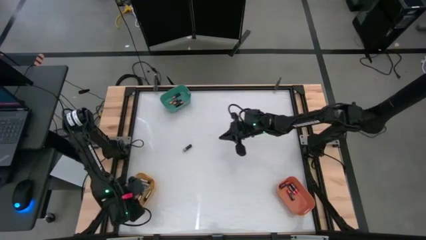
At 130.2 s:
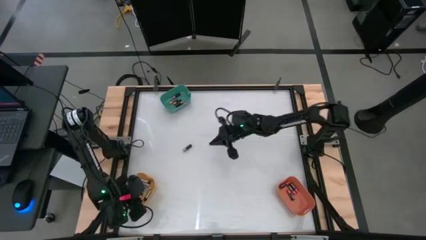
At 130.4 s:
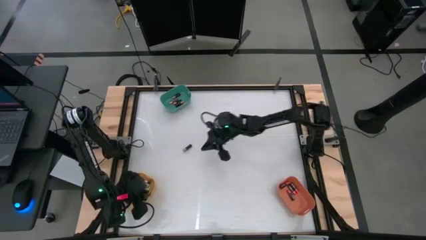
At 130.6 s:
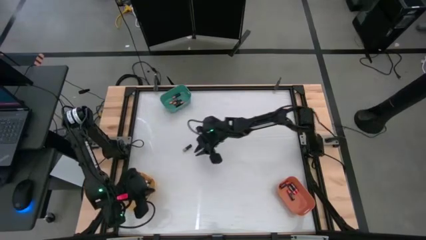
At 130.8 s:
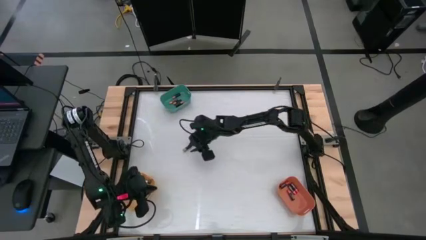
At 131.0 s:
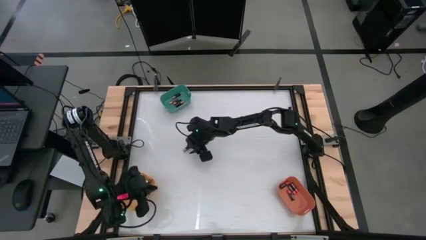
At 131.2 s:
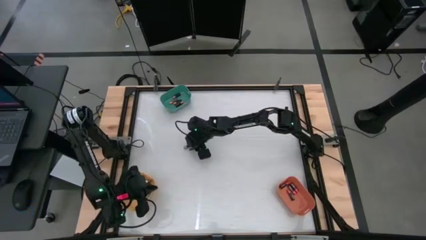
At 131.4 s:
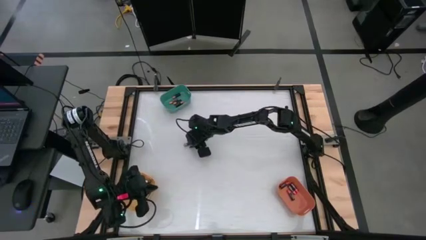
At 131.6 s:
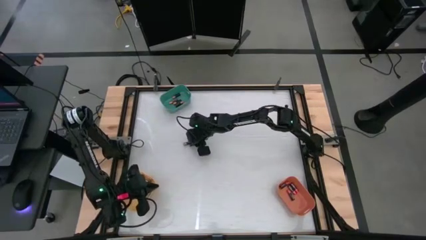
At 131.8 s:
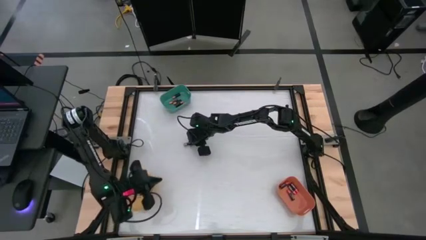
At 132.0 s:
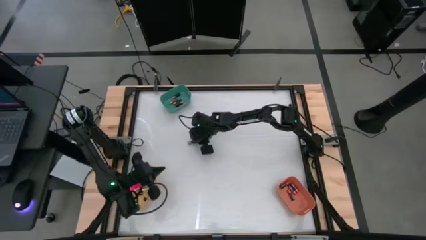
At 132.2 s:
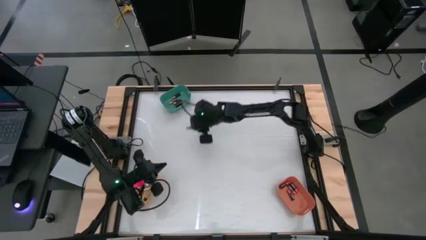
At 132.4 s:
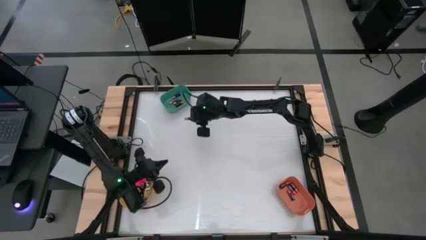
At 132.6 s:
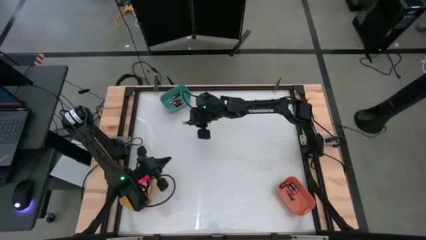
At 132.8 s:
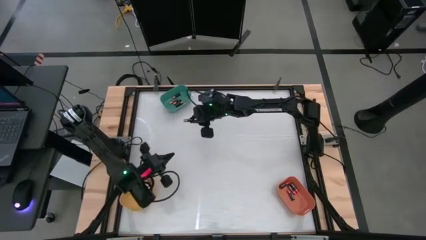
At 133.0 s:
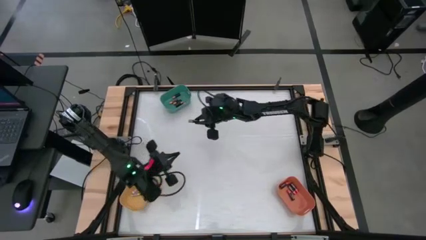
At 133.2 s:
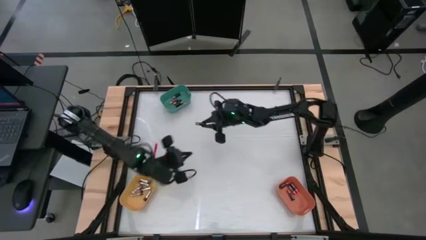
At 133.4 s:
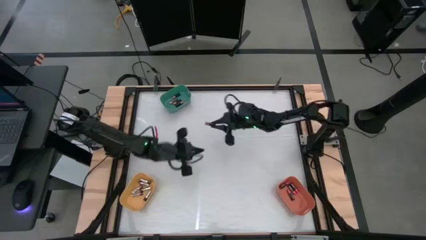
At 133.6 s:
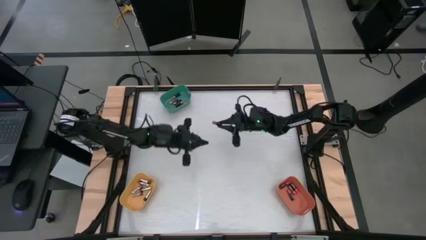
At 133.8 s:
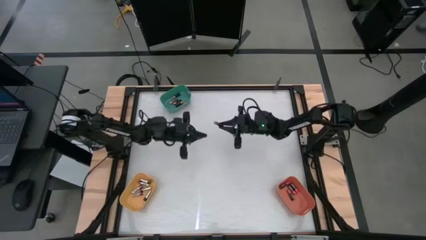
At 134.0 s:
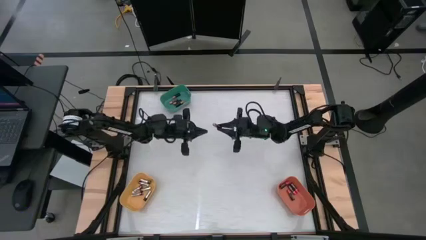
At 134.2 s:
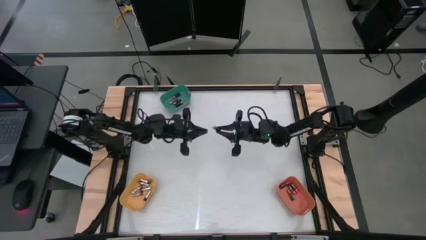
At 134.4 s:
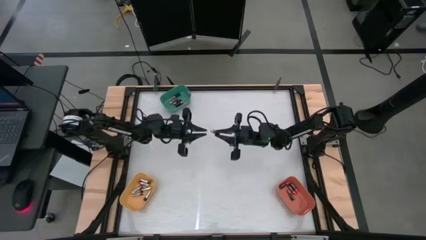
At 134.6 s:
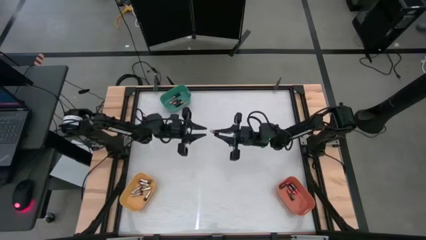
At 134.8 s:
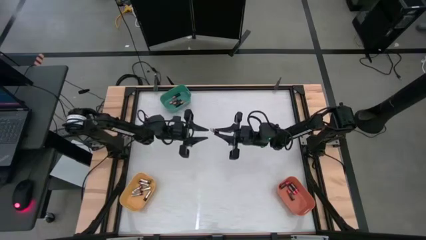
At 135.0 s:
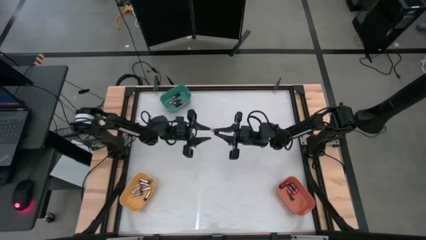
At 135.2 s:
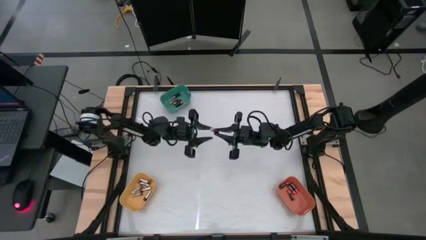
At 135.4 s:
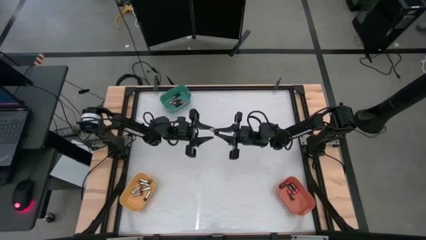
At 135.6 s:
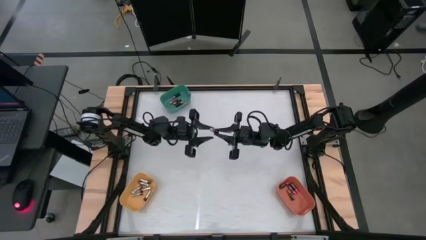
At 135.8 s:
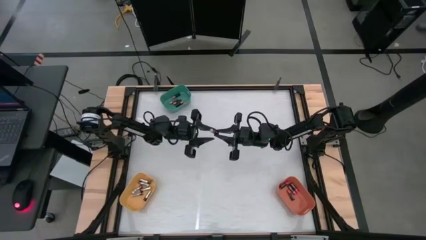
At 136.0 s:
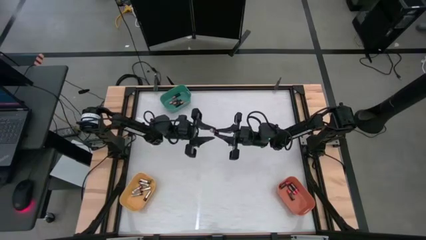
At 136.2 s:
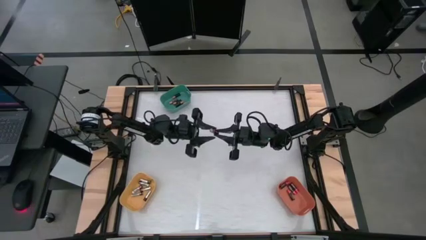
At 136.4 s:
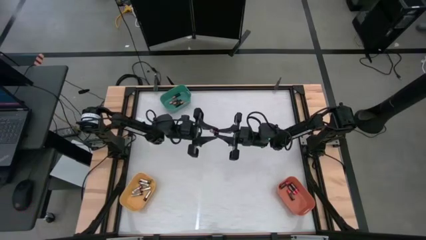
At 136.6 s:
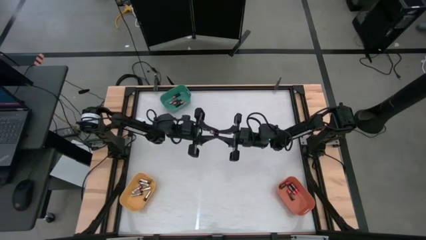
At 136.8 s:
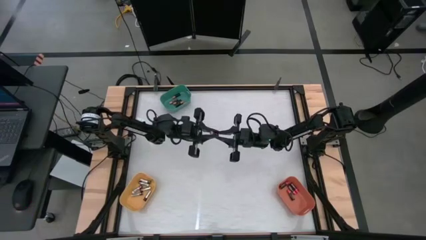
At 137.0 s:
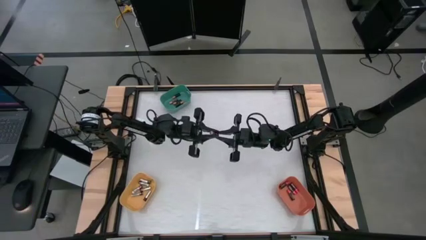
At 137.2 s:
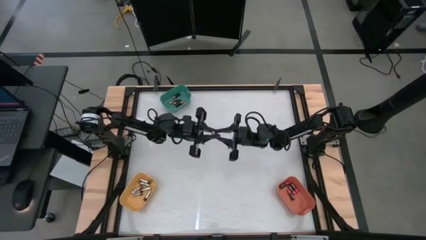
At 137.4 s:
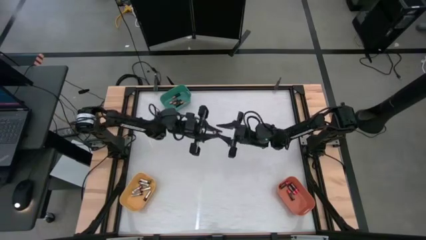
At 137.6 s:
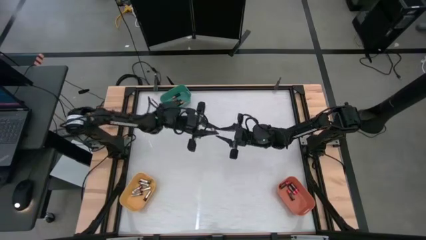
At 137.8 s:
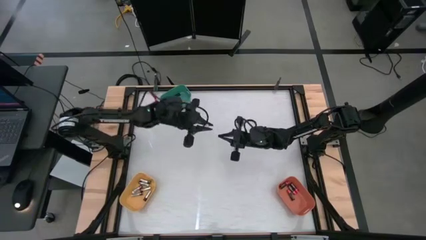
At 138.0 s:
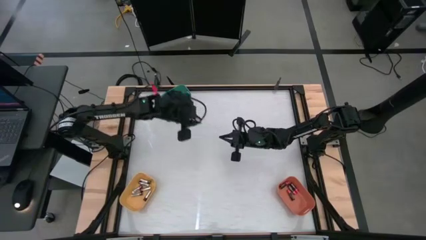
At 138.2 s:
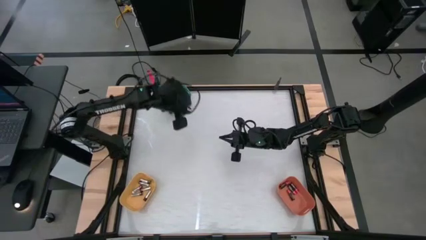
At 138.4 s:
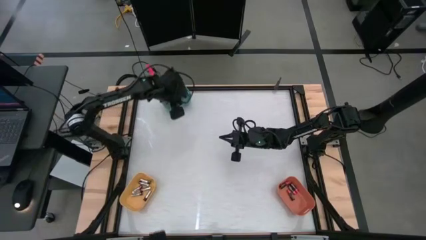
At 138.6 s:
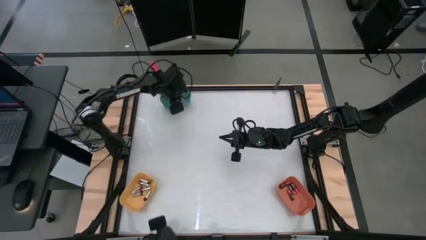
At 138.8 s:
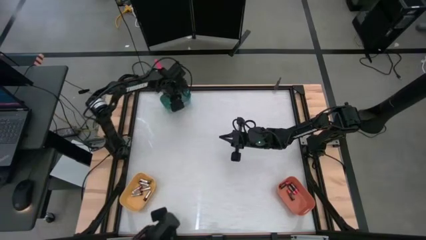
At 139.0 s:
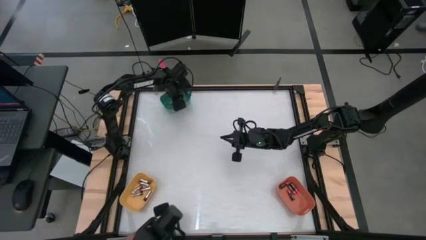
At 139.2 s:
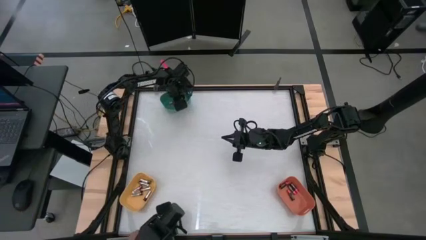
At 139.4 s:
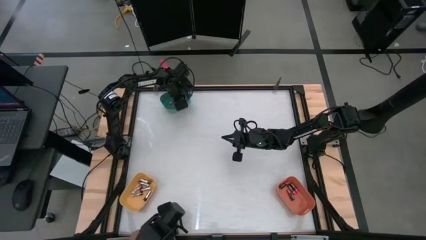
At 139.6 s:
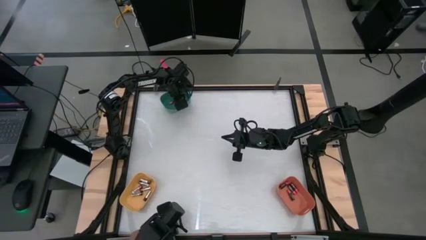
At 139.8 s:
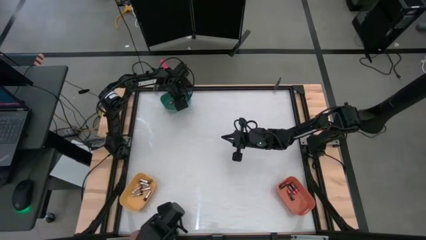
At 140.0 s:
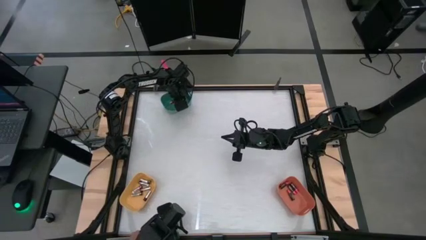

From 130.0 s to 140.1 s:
Task: Sort batteries
Put the brown battery into the green bin

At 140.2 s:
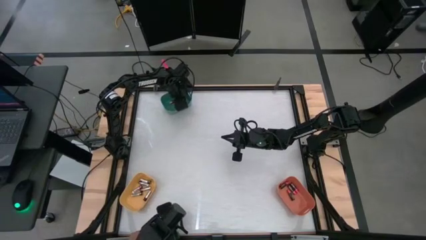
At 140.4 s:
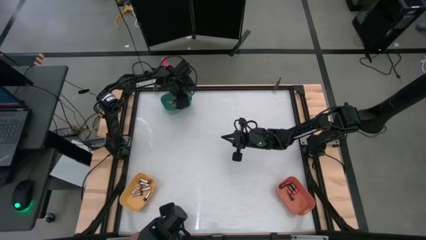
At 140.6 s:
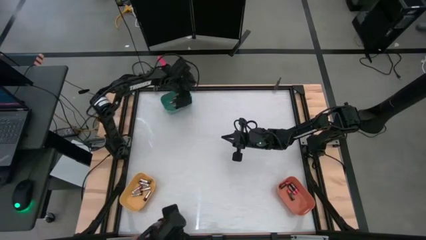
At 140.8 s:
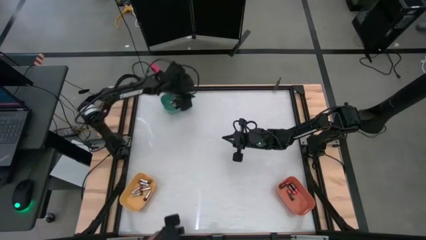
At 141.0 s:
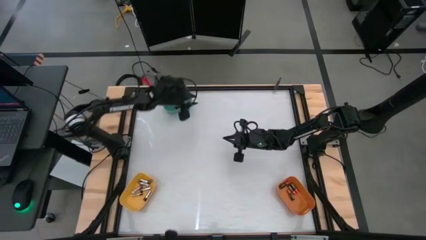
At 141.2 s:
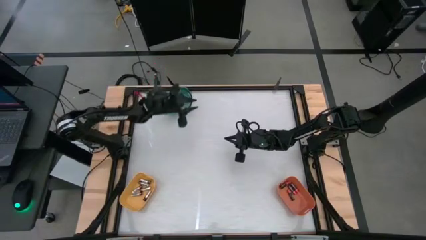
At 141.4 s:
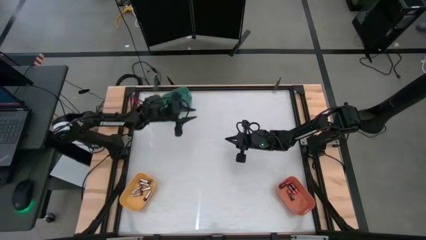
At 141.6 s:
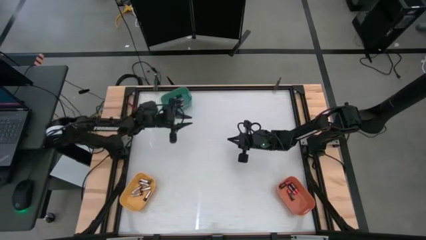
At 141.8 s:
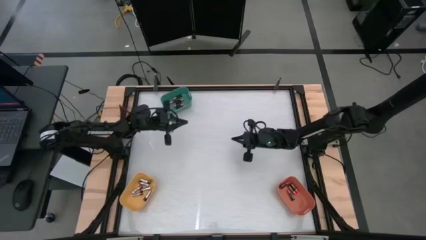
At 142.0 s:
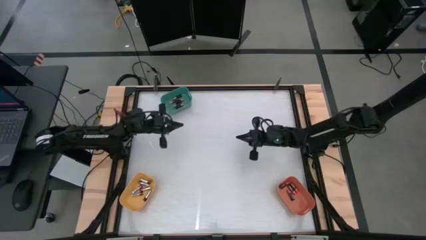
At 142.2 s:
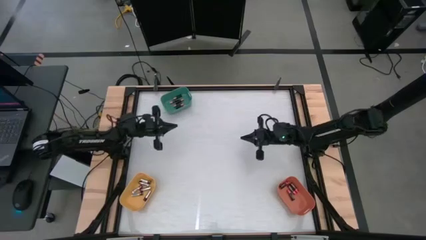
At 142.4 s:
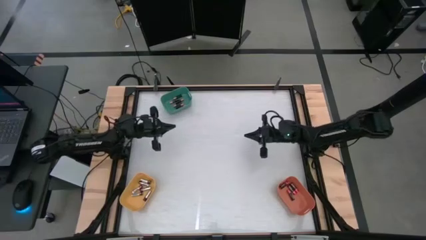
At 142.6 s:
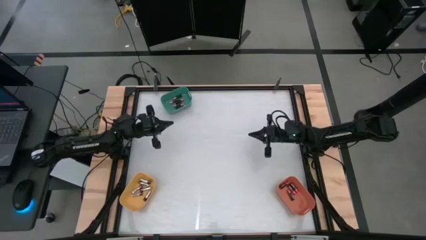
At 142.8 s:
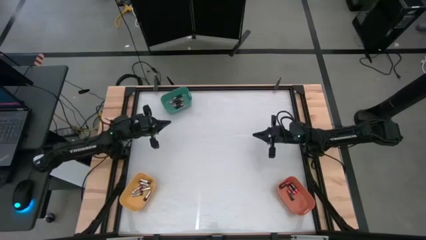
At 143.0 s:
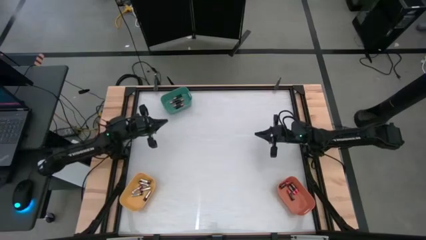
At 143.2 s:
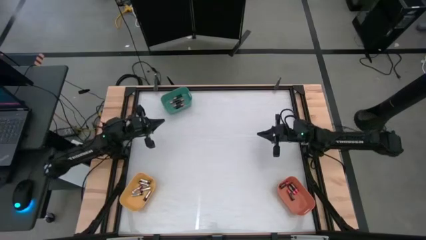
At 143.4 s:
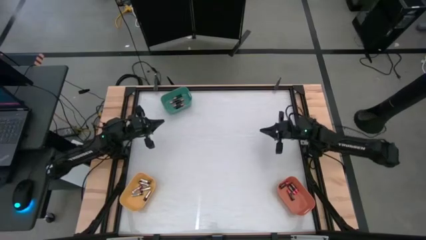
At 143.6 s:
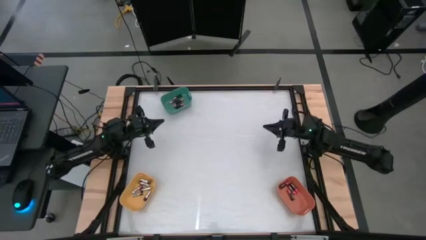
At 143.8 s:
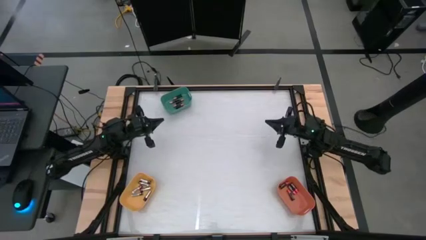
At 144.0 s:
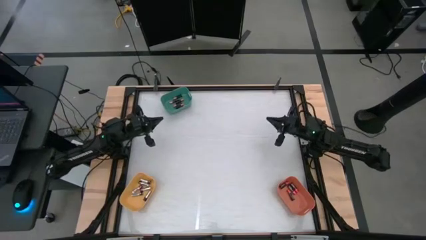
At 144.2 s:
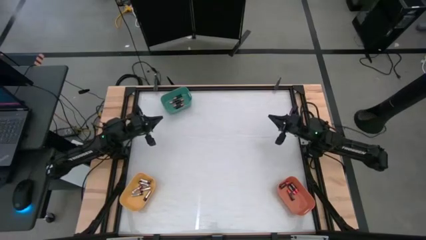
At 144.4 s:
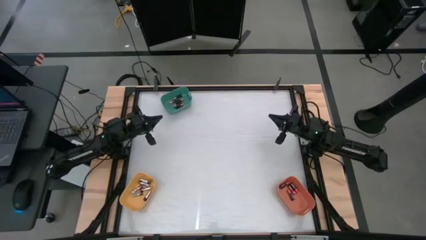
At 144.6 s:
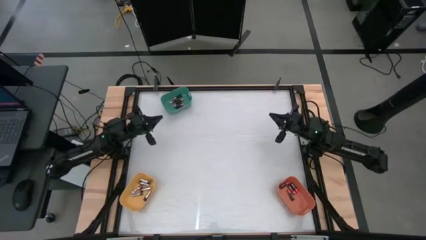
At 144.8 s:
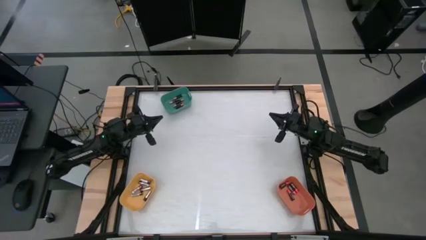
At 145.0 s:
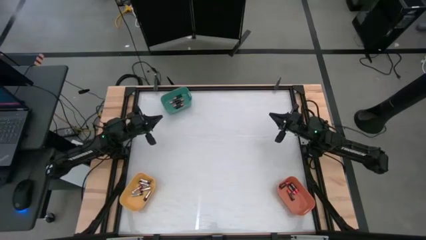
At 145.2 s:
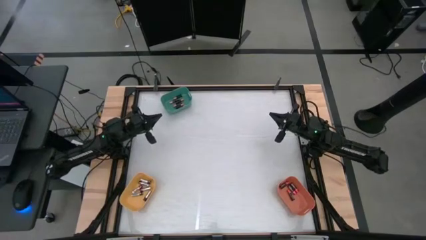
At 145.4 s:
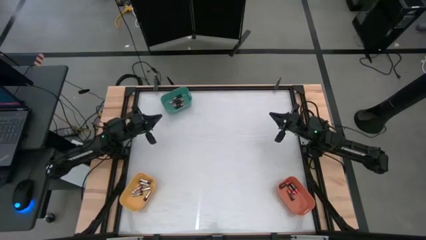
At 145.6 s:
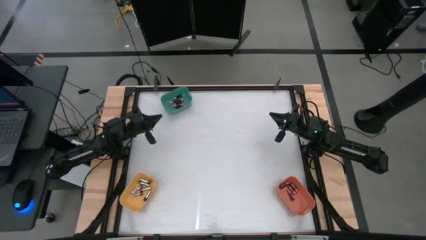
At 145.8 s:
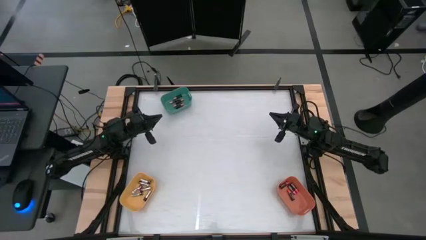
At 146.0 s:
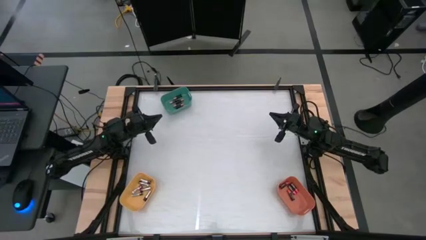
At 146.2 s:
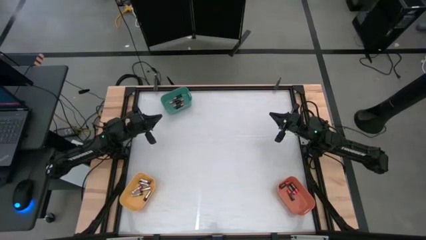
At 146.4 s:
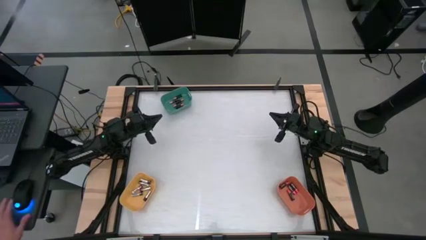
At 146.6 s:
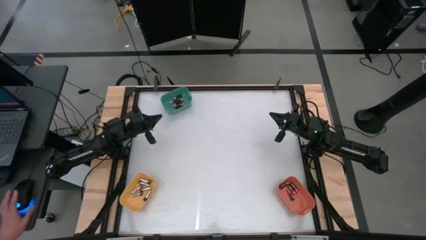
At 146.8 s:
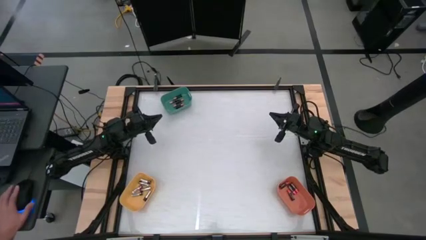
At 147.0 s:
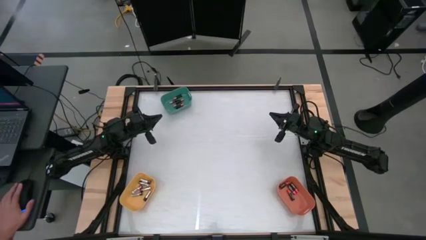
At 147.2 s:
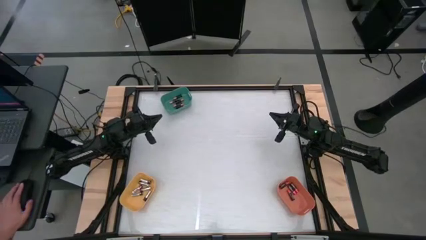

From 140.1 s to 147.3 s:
Return to Home Position
